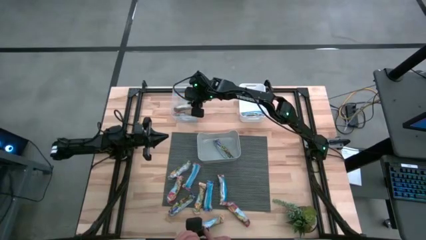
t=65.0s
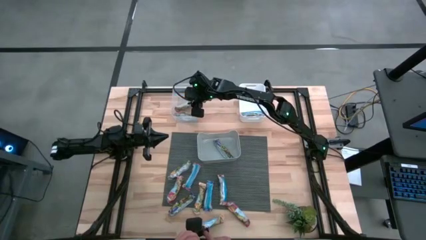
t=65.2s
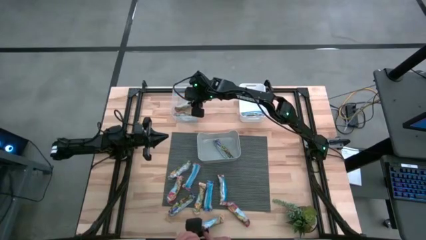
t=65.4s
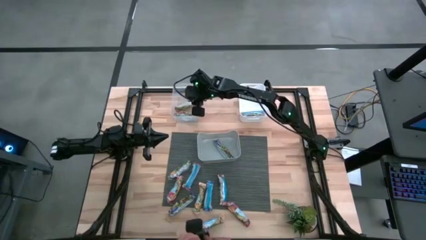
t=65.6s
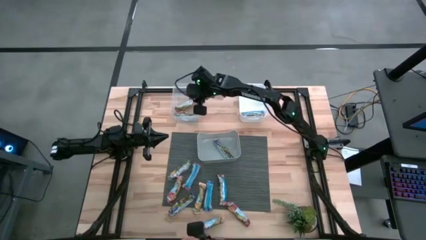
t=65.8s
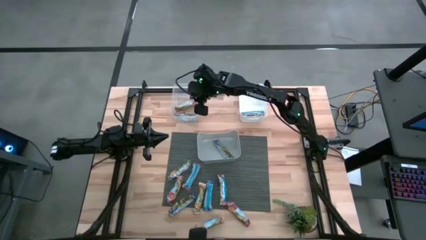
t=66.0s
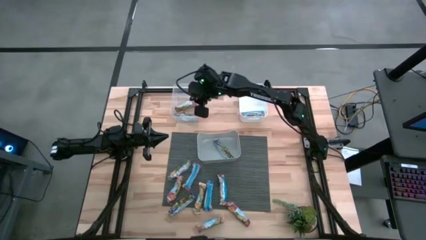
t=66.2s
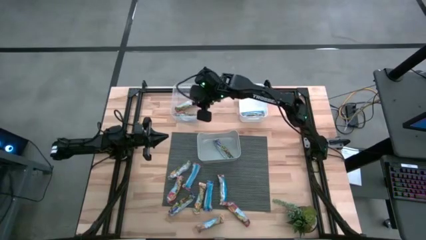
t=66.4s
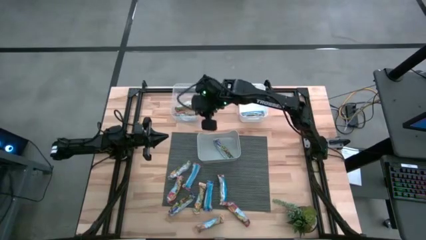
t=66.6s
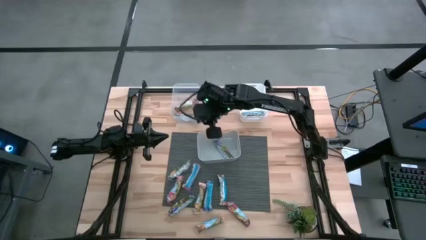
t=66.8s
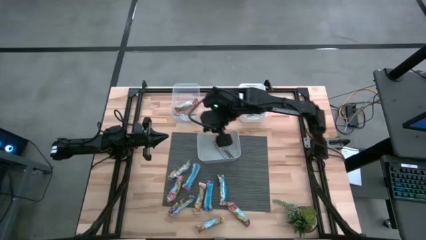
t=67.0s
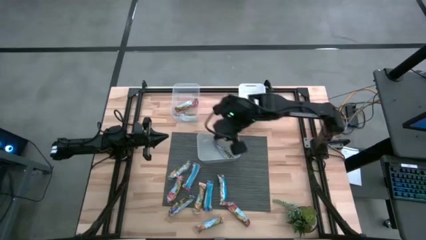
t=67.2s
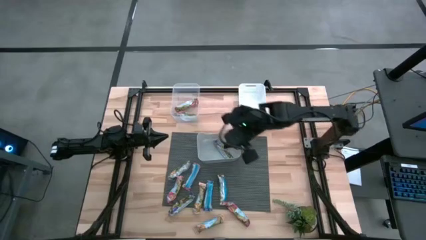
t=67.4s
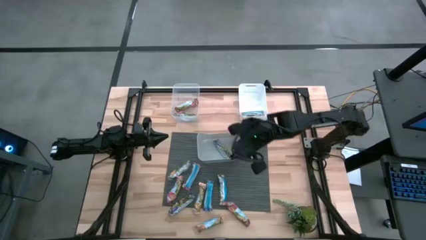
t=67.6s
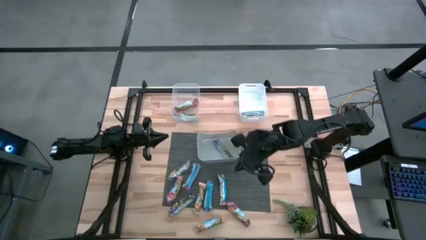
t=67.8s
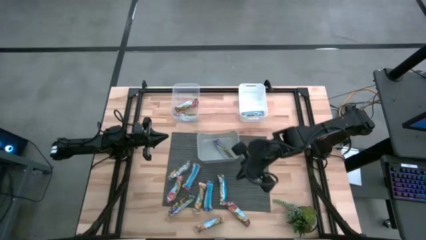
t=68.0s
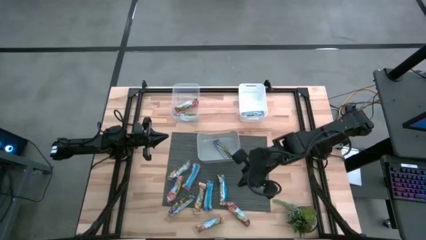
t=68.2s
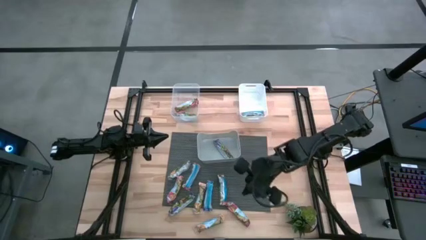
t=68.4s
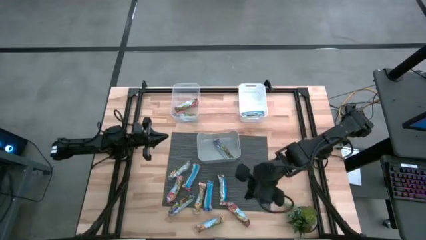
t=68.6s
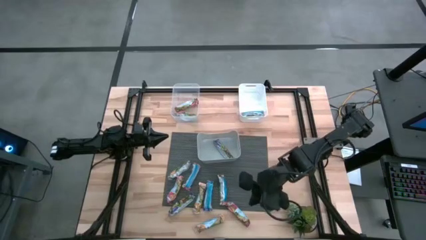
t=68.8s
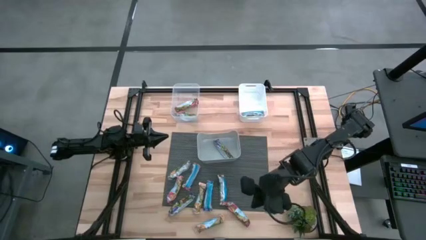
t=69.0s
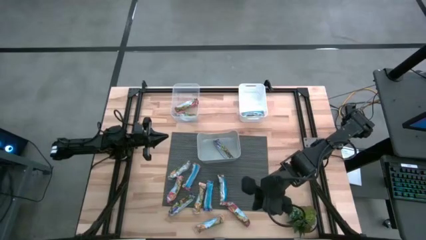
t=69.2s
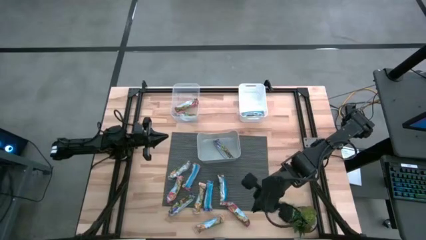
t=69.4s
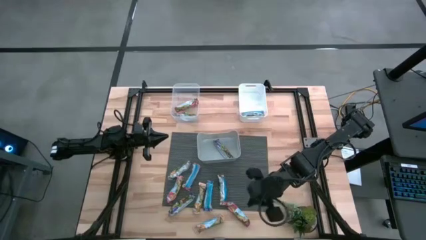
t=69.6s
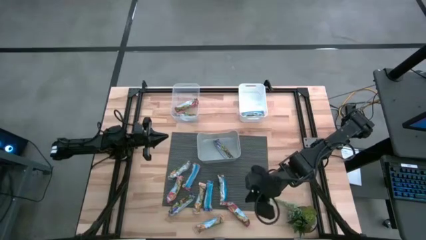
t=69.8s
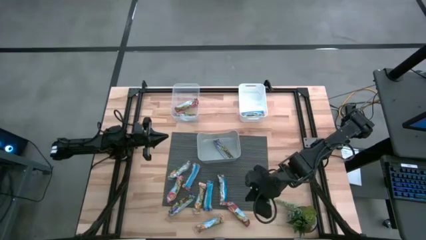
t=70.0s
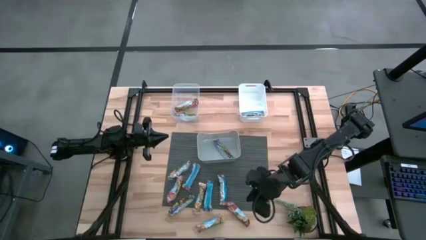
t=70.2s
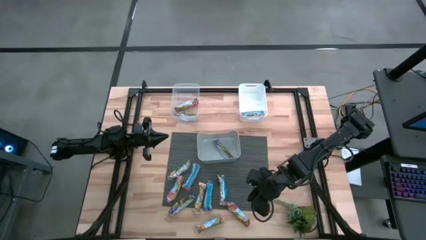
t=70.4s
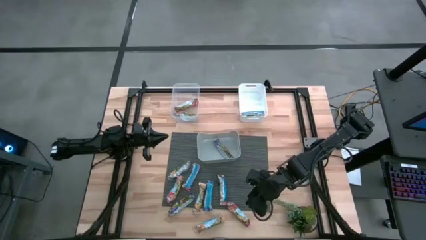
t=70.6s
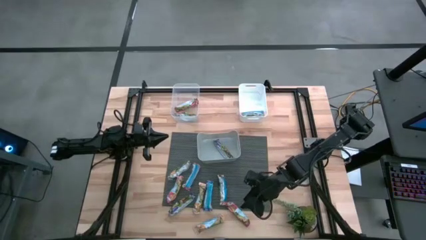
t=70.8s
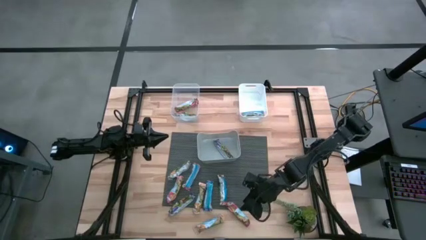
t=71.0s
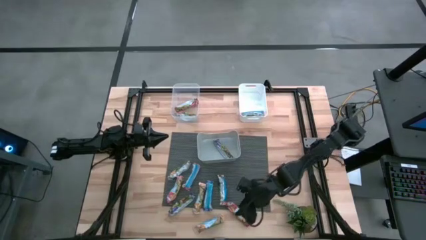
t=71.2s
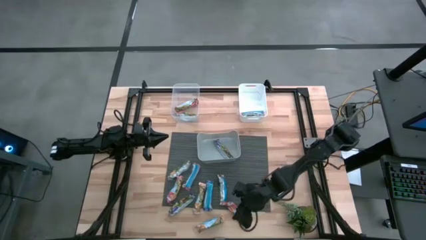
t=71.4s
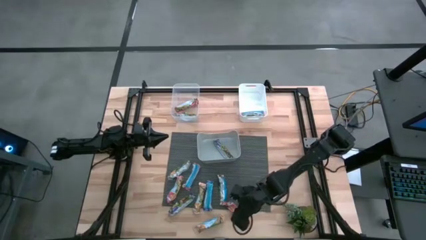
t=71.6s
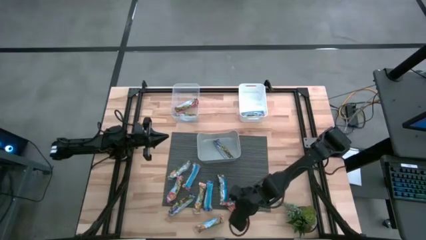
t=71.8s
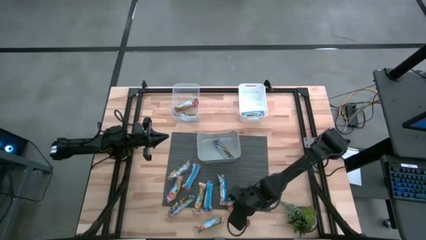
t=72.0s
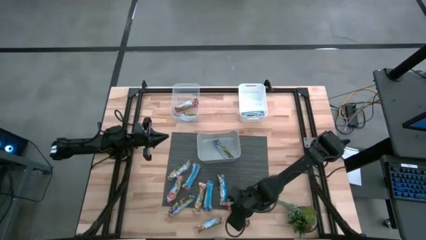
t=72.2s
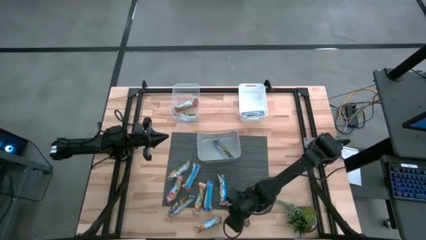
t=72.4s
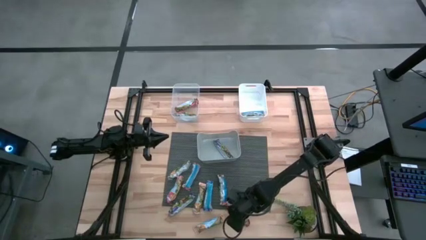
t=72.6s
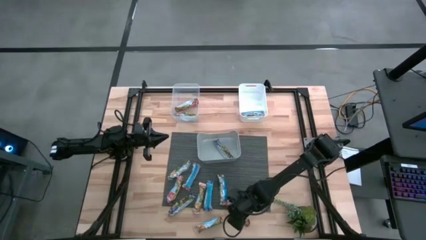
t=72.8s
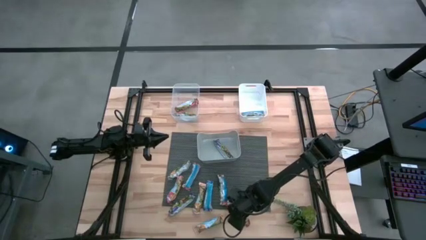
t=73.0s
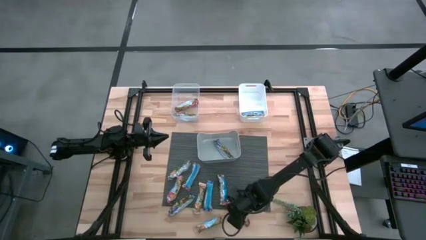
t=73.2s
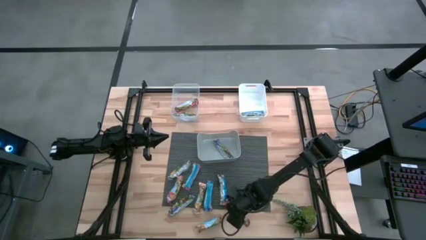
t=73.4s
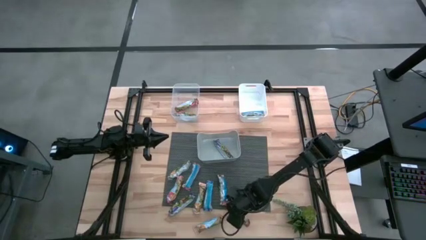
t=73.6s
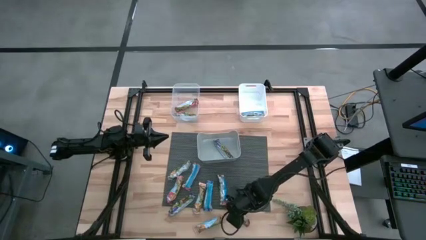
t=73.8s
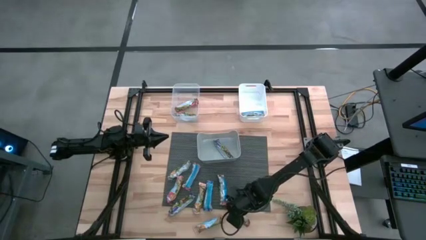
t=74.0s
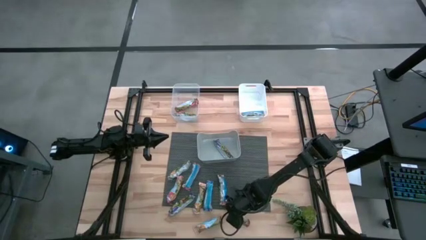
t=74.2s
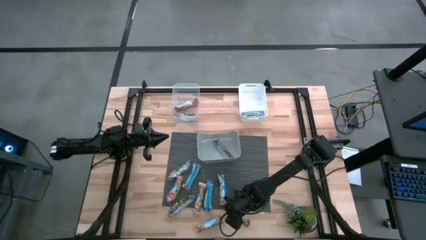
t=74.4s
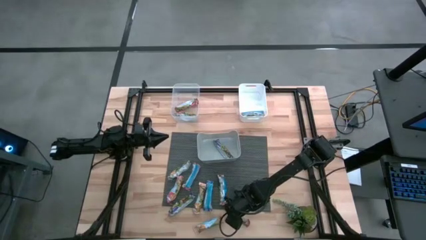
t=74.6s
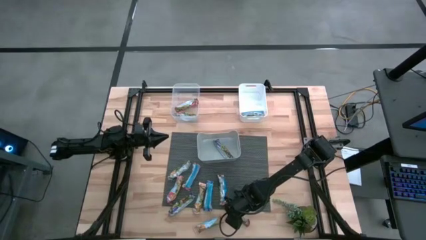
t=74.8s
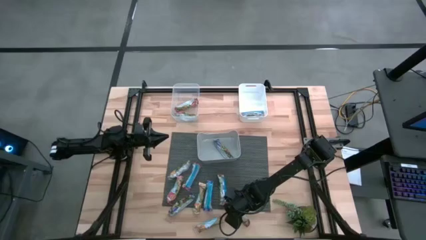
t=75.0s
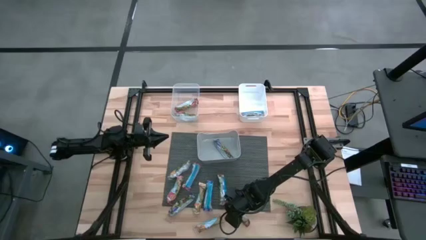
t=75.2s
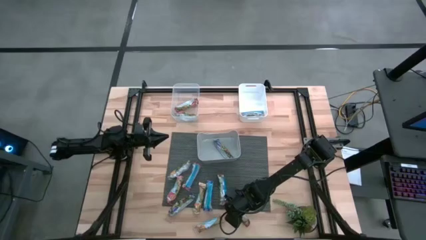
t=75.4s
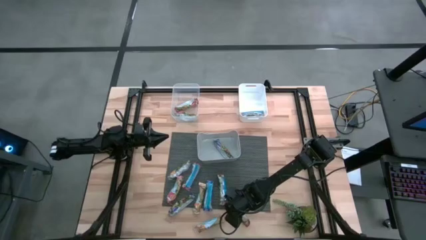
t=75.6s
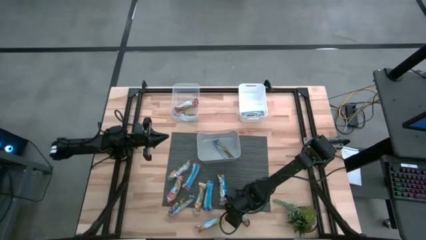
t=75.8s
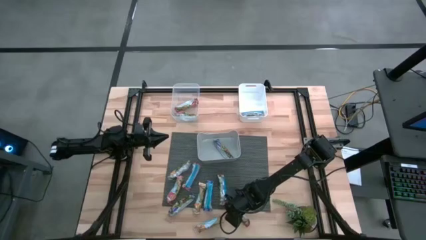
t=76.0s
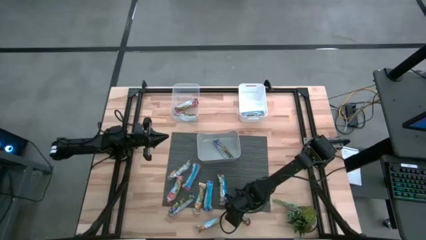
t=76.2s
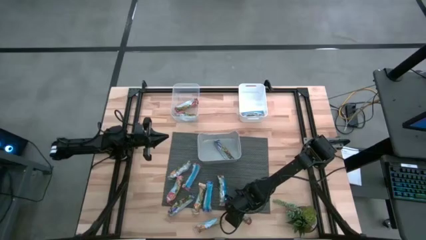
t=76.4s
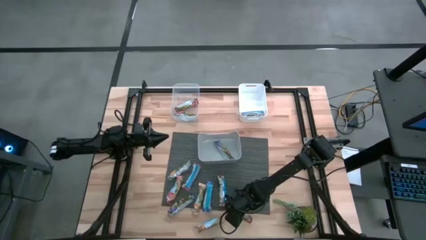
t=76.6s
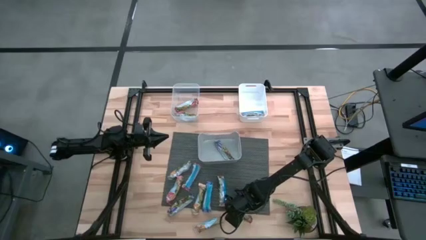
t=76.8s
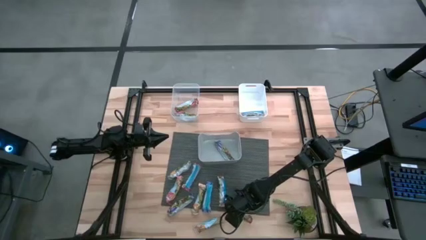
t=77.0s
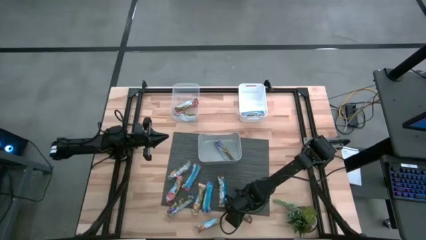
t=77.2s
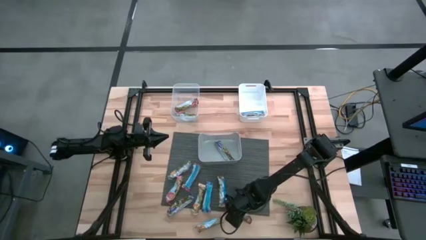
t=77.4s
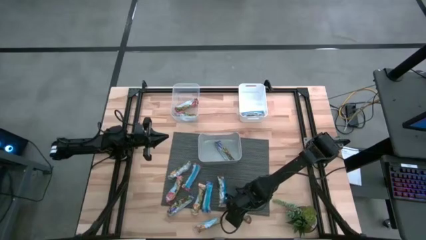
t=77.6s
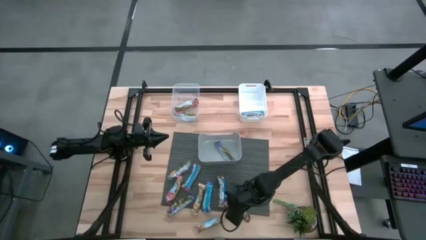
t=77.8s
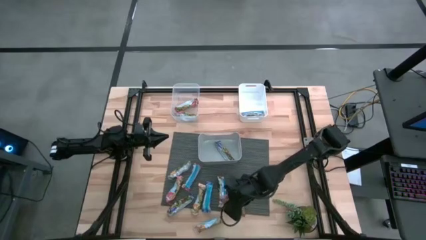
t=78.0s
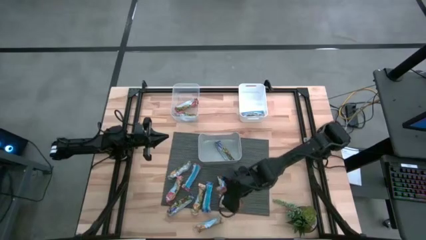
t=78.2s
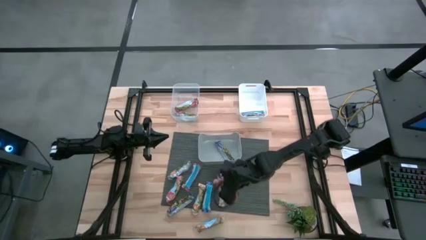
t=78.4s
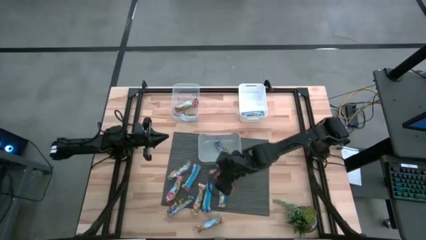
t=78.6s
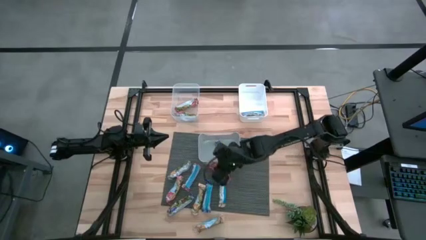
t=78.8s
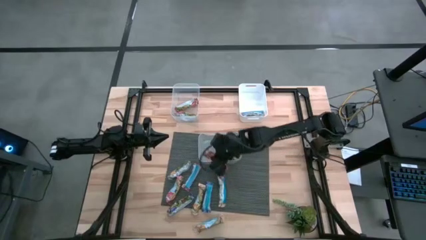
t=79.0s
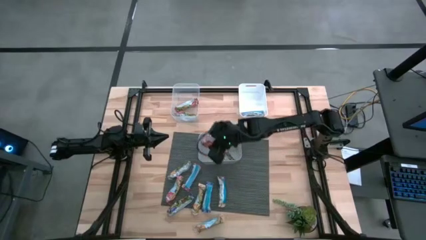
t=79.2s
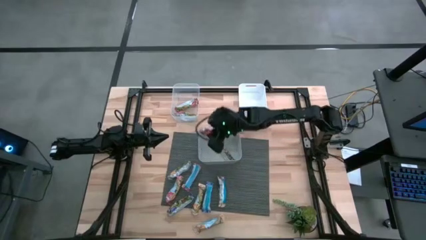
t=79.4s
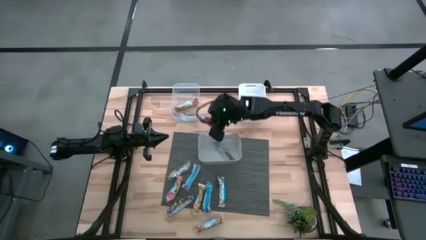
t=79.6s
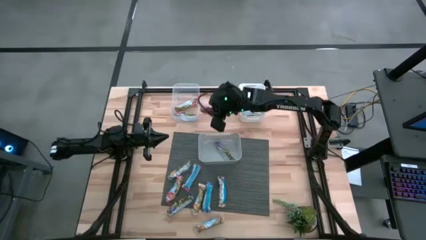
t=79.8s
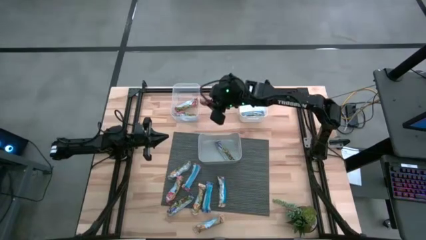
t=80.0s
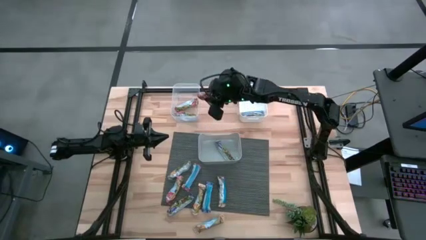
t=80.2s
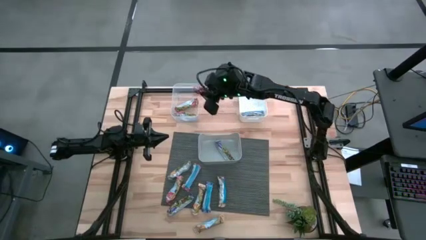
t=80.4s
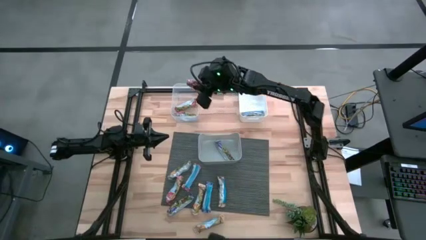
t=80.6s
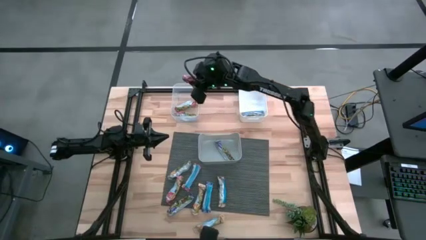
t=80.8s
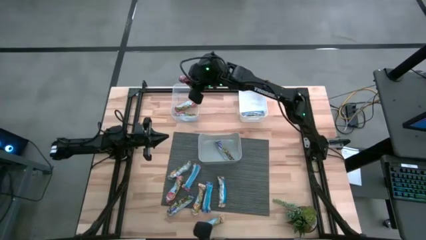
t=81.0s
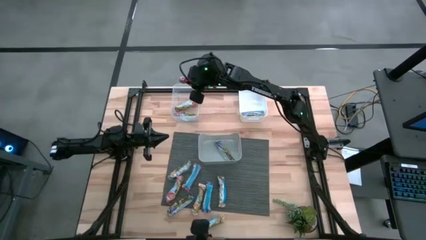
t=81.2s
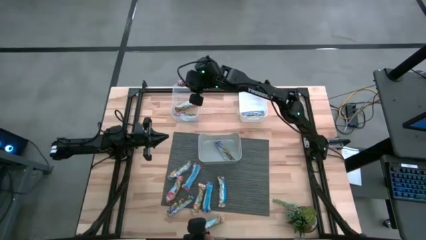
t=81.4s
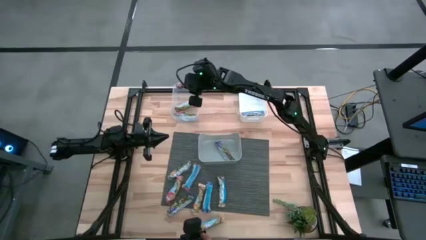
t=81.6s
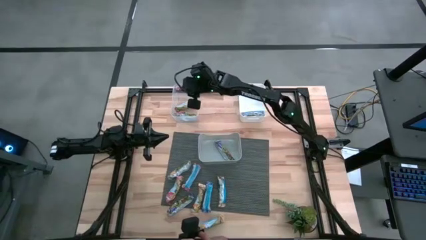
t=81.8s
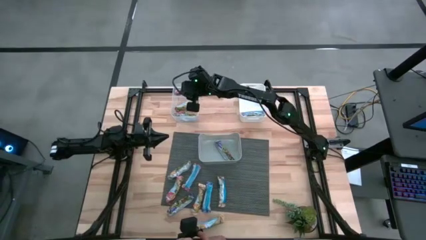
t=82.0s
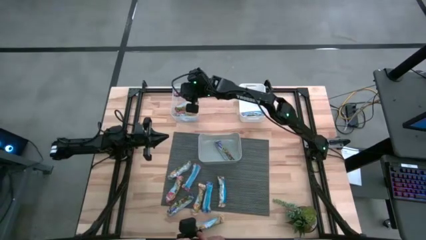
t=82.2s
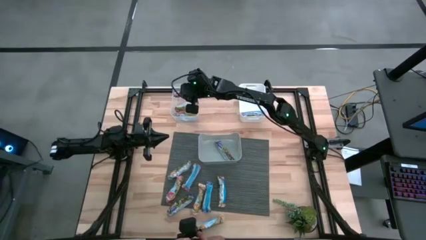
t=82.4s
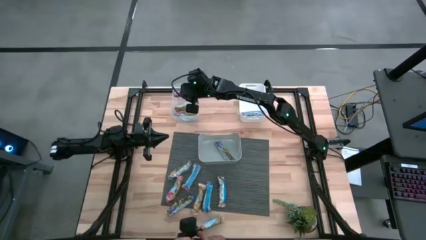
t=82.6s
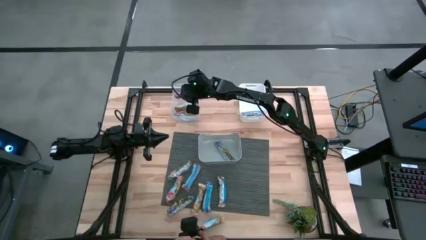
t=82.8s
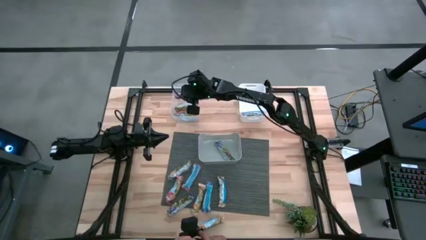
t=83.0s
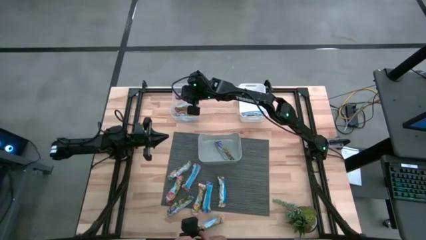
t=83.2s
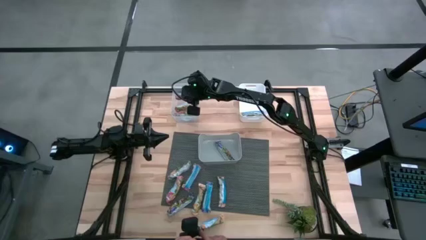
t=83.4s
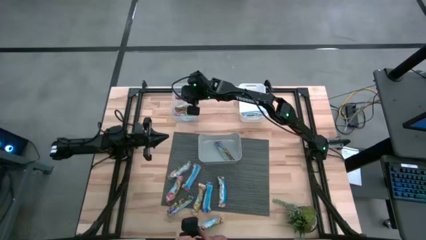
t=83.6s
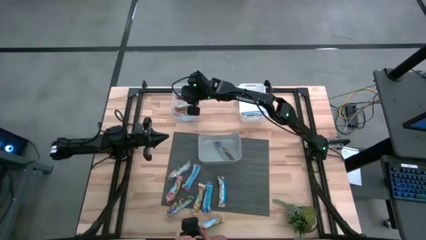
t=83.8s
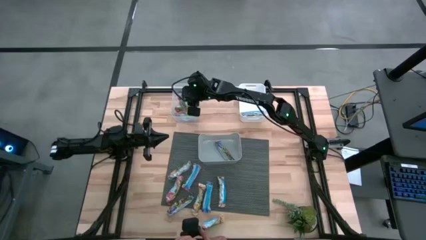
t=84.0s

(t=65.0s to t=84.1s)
Task: Pick and place Granola Bars by type
Put the red granola bar into the transparent bin
